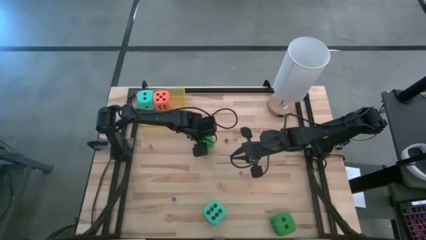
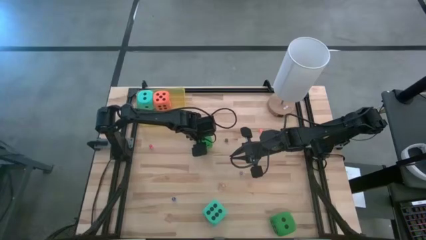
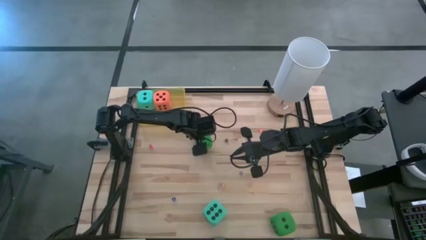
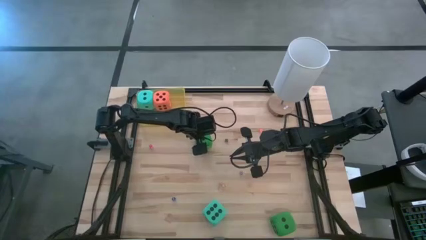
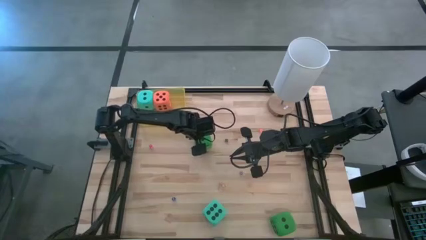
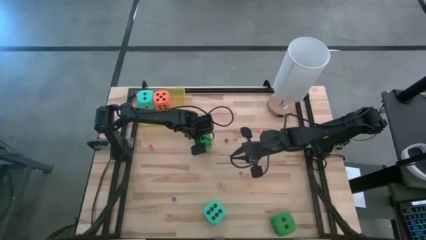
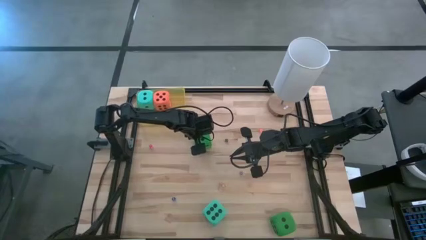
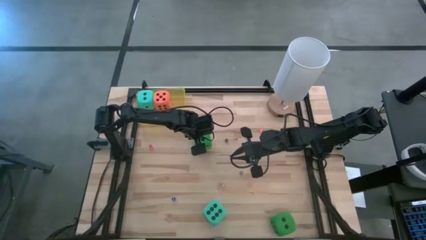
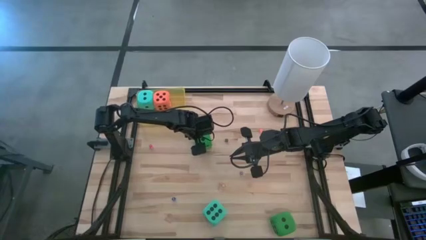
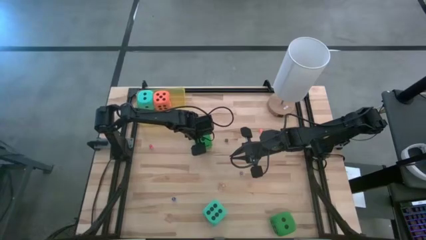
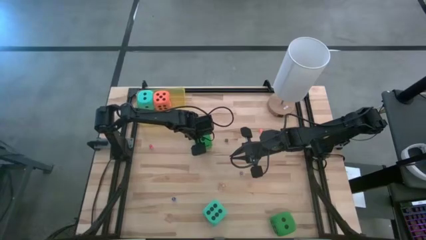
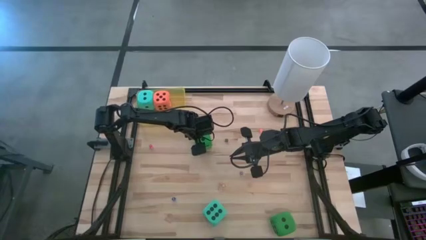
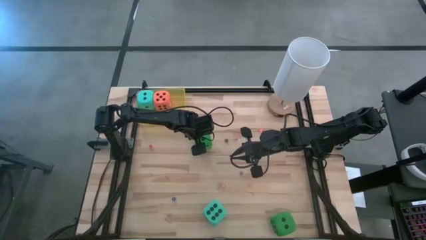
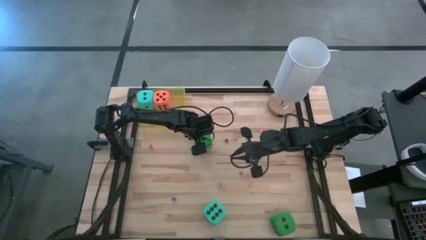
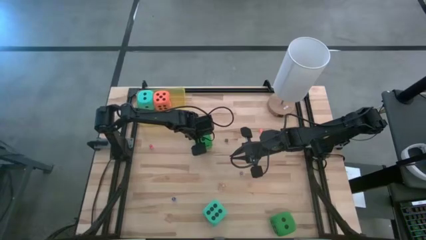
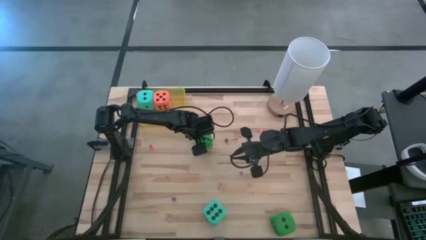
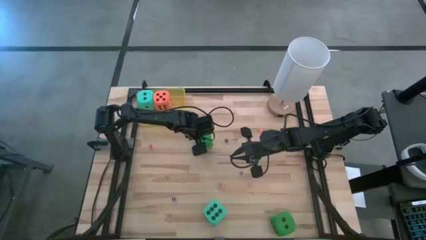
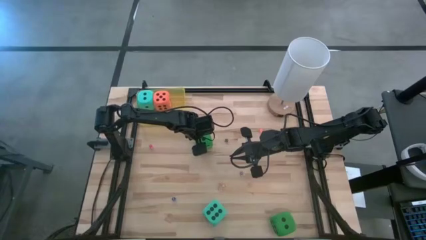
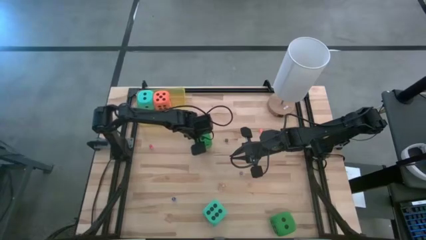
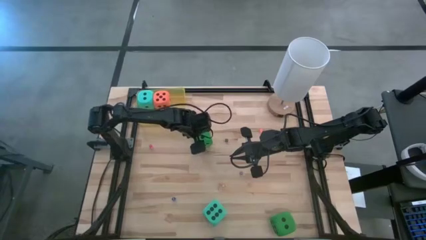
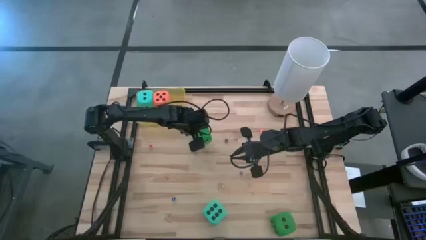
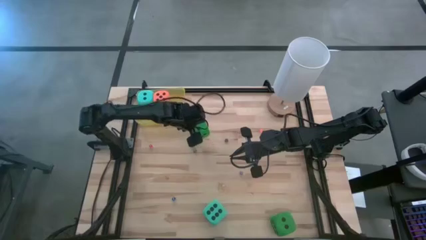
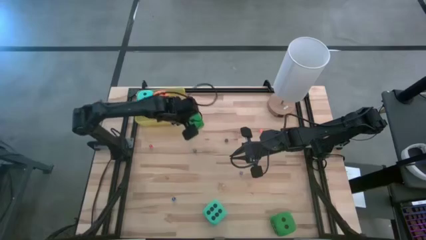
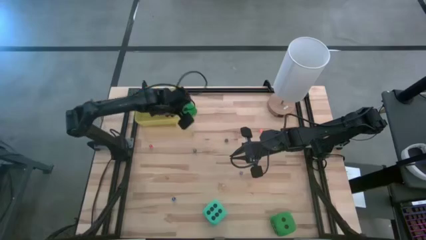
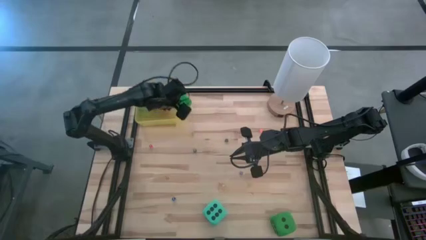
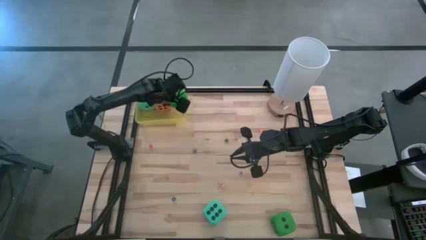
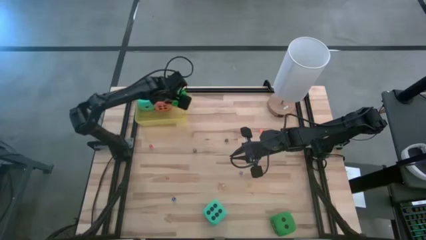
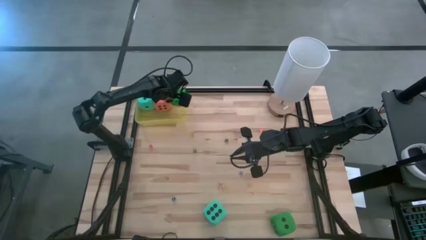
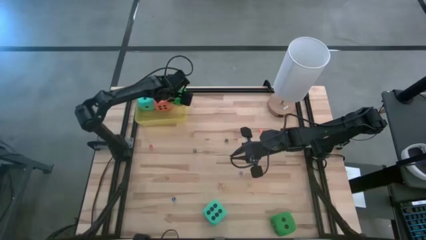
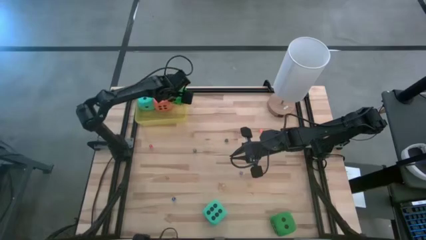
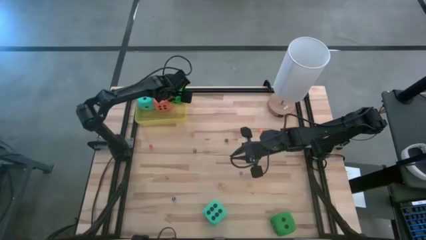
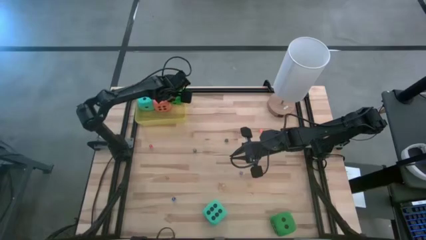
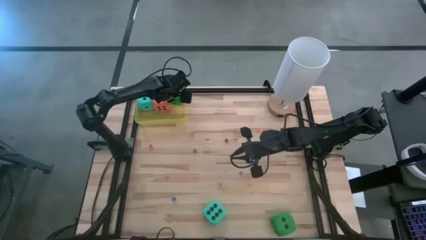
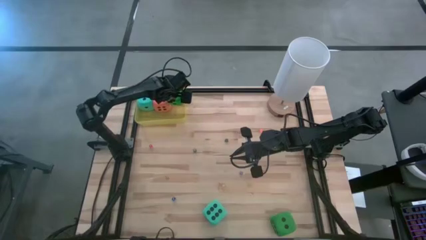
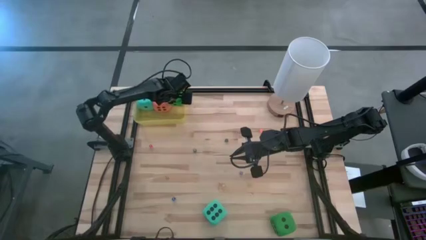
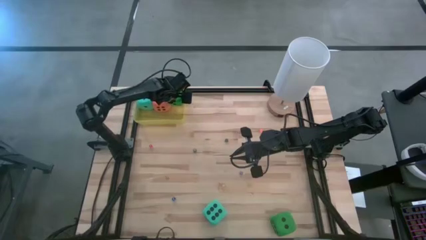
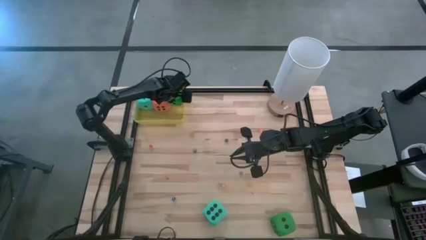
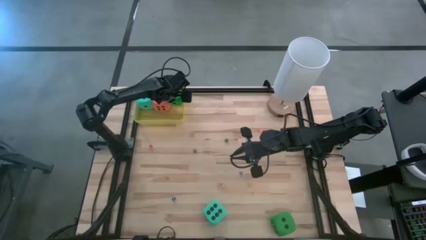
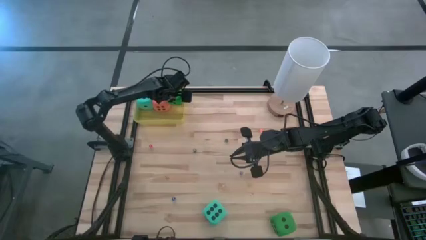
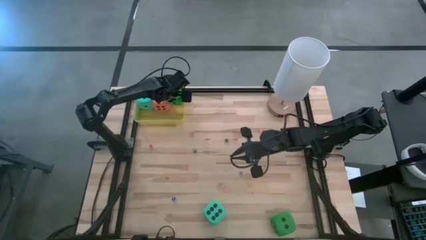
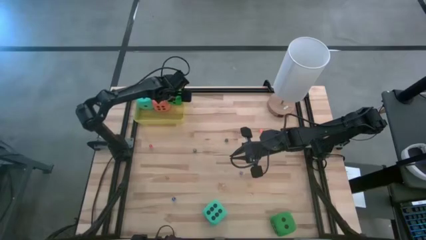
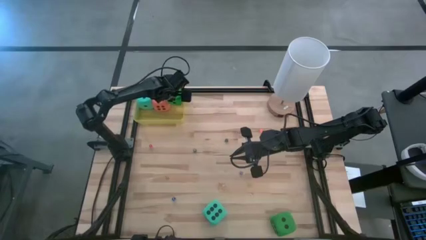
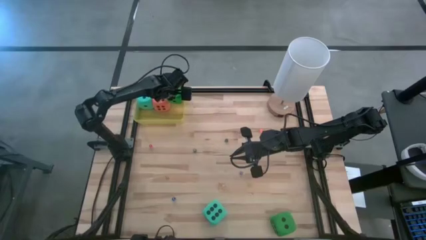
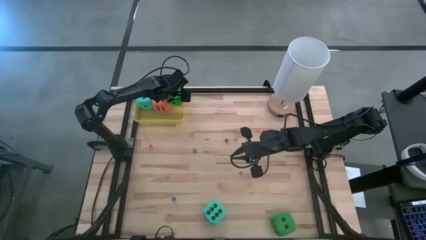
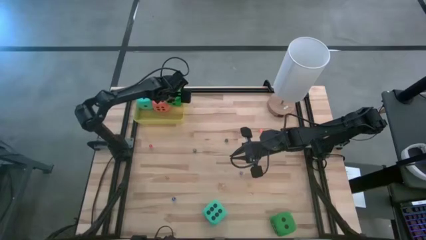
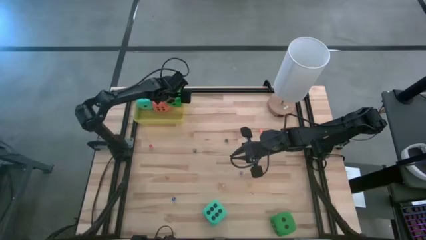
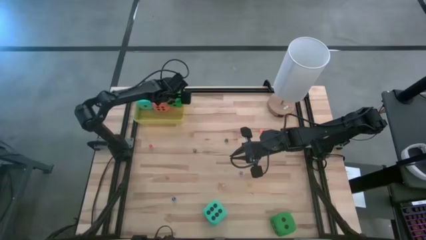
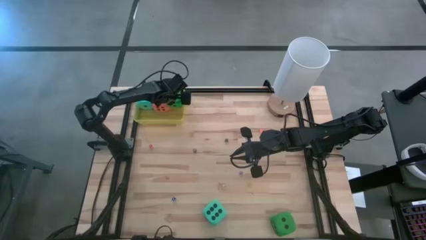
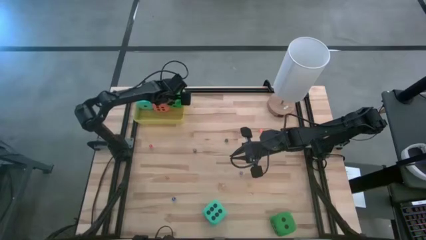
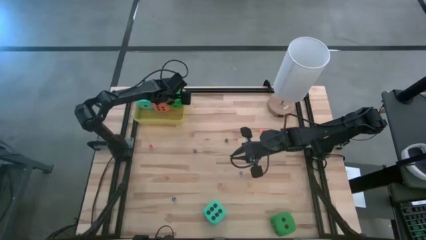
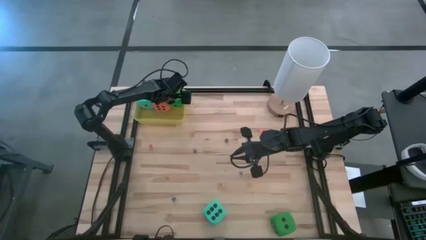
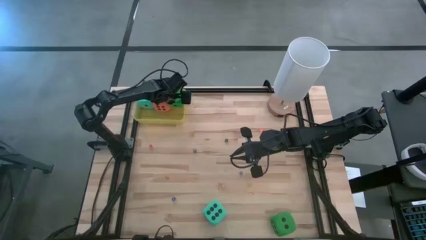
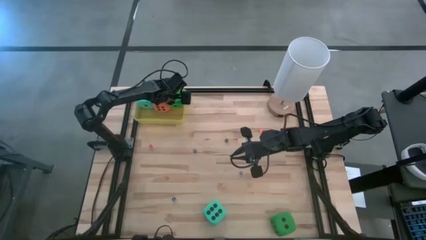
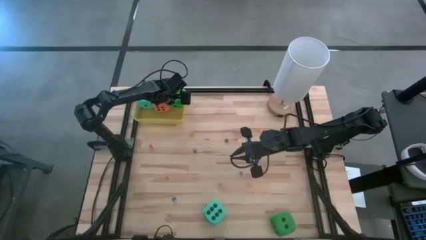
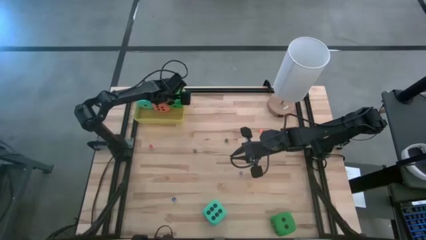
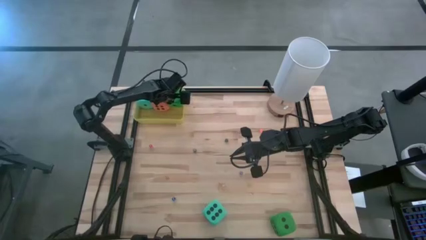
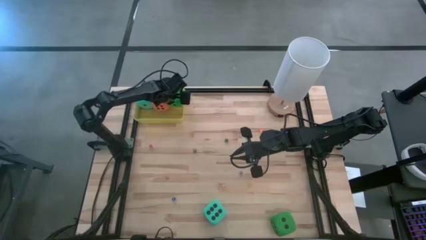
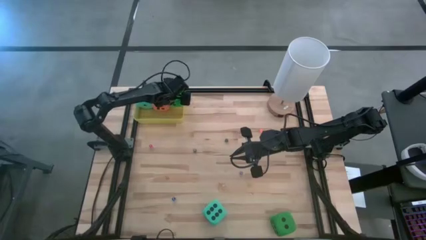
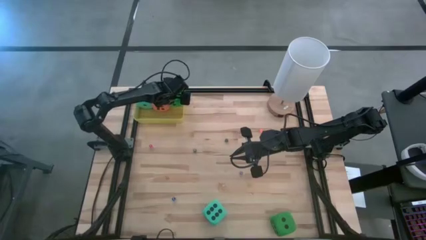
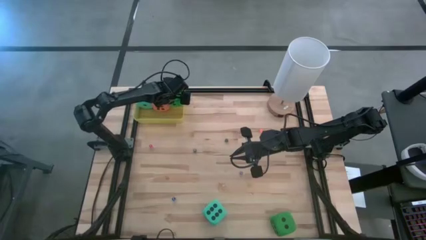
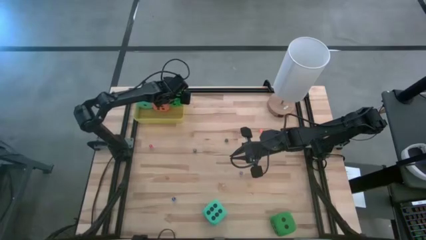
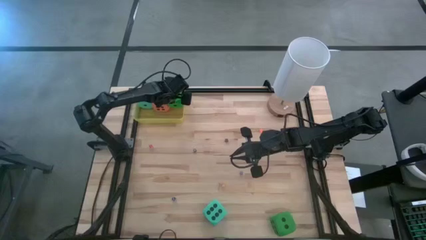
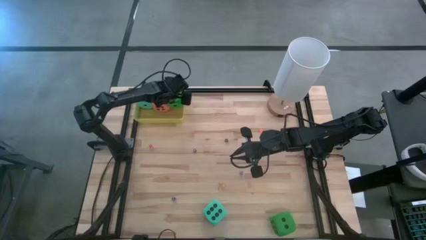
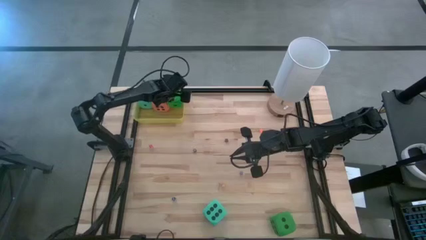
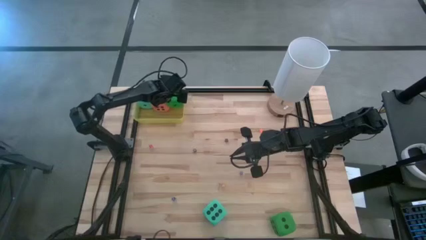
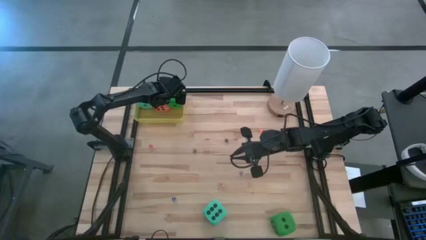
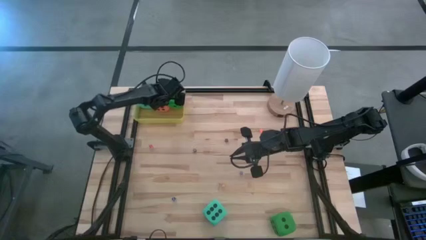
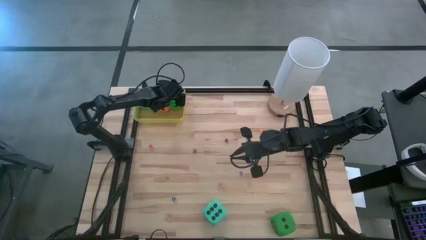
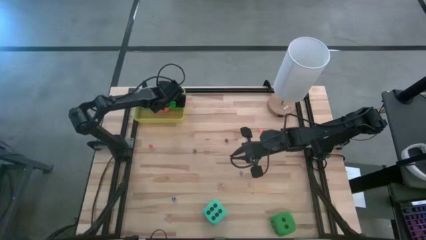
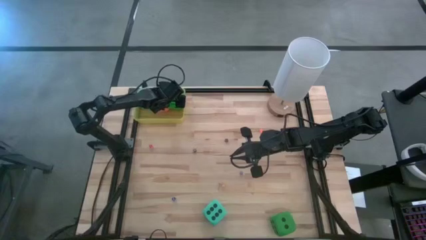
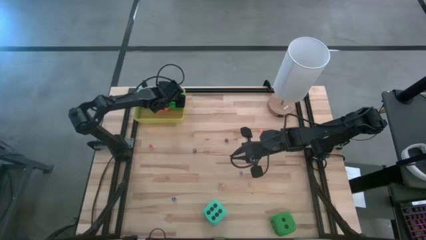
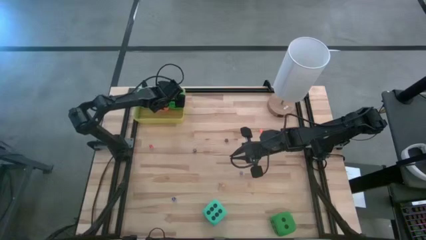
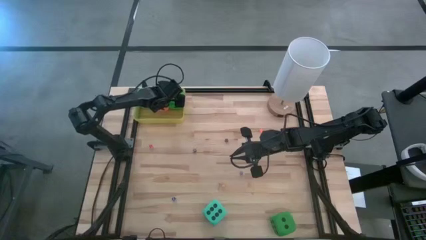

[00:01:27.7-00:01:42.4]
Task: Pick & Place Dice
Put the top green large die into the yellow bin

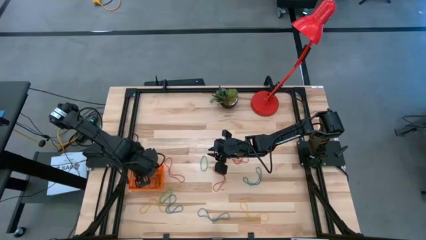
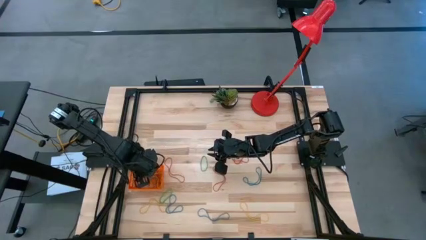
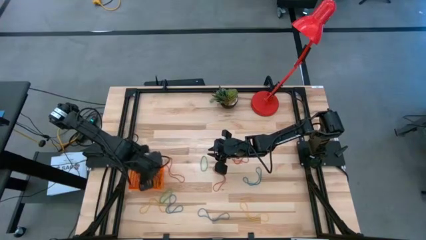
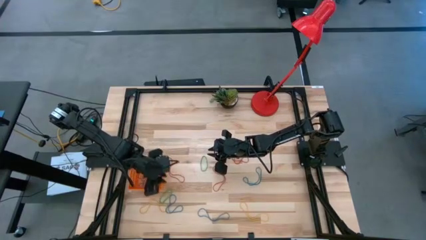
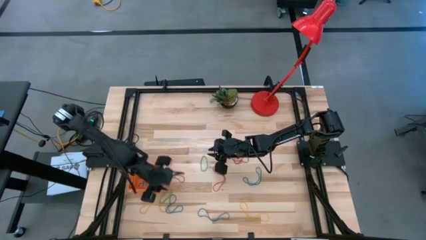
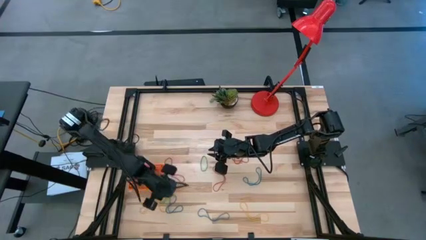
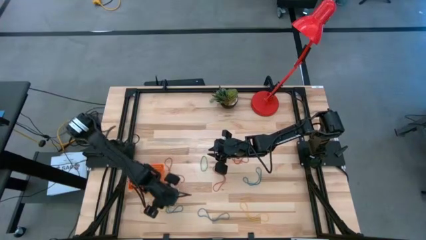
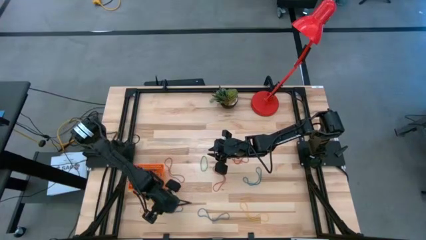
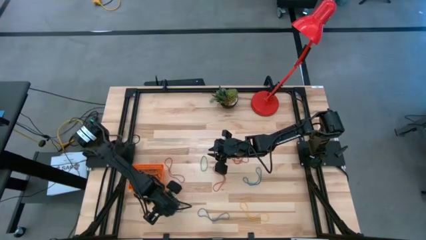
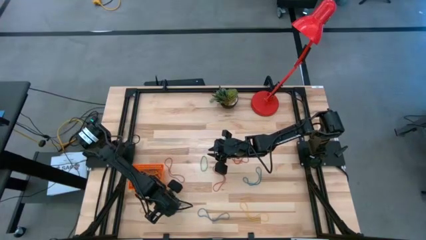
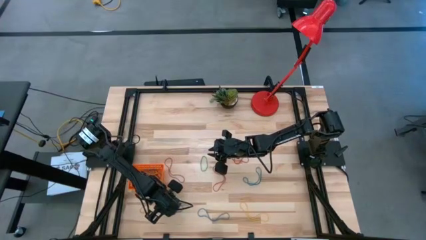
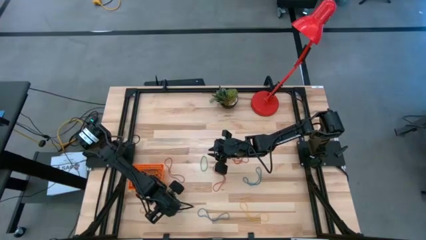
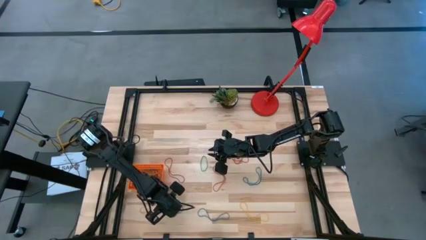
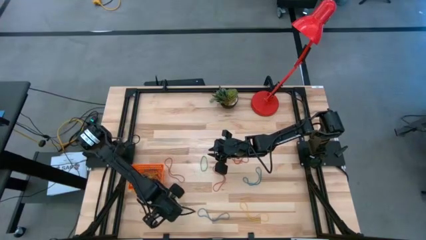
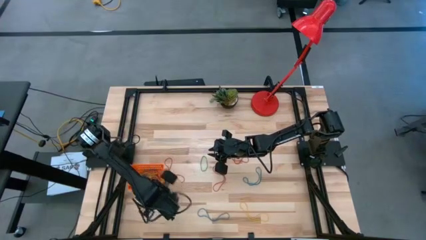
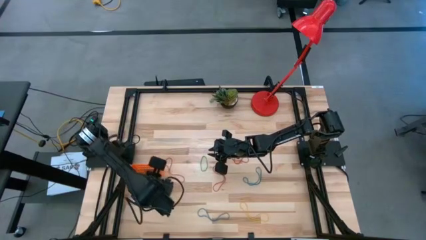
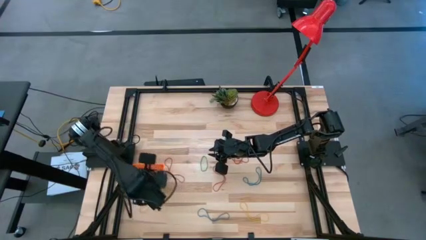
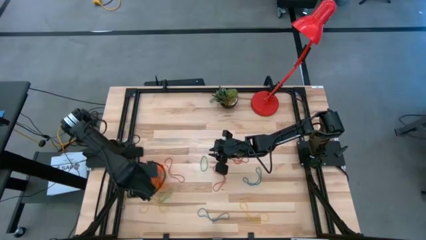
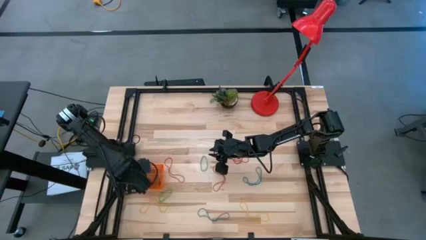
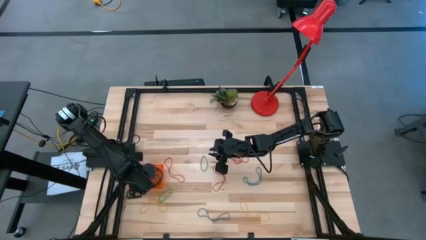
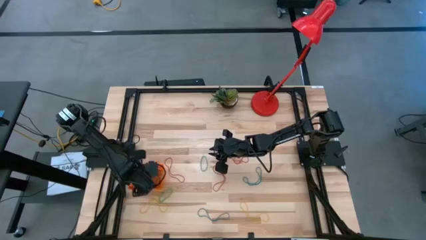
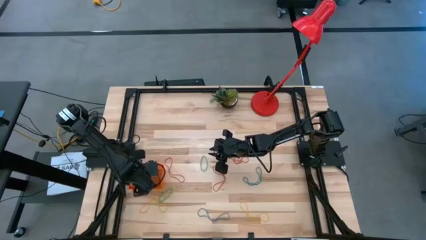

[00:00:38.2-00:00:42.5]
Task: Pick and place rubber bands into bin
Put the blue rubber band into the orange basket
